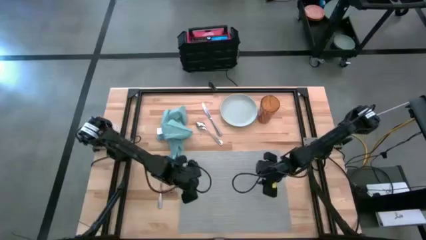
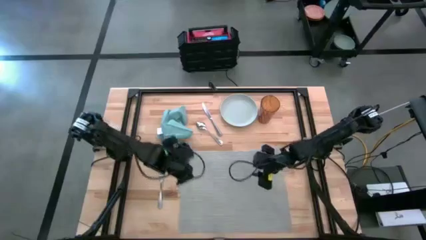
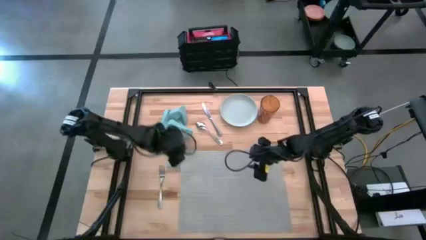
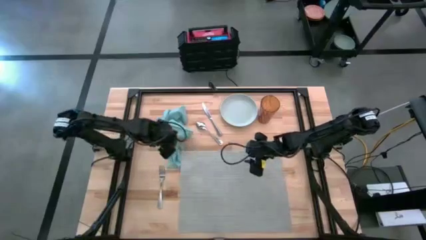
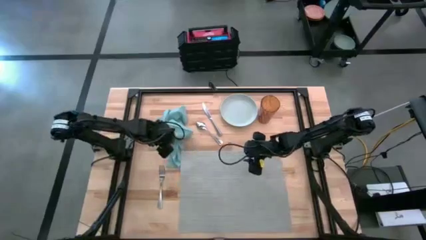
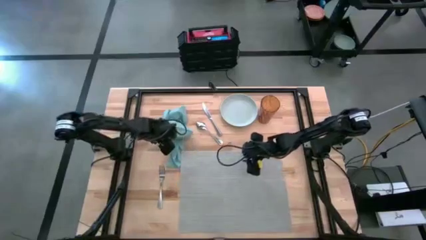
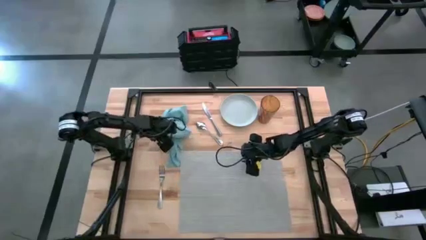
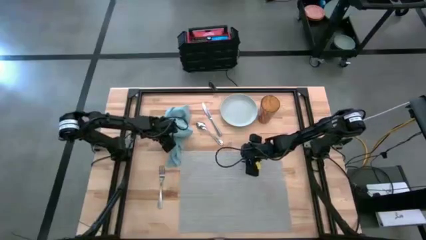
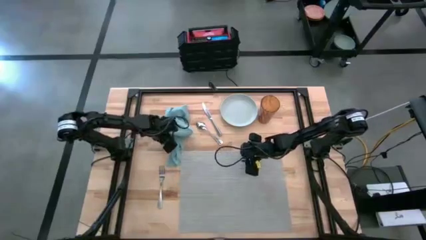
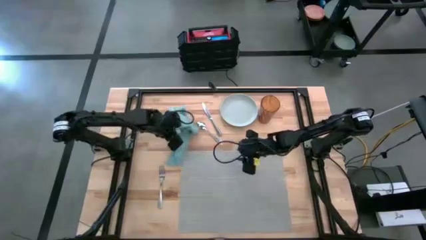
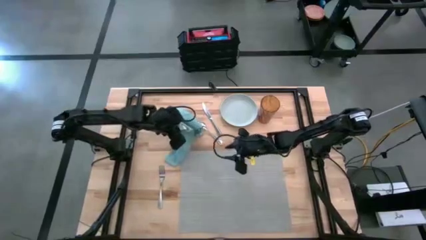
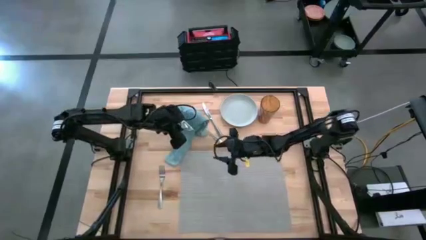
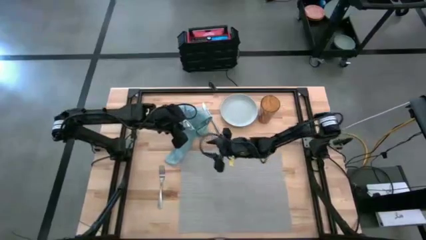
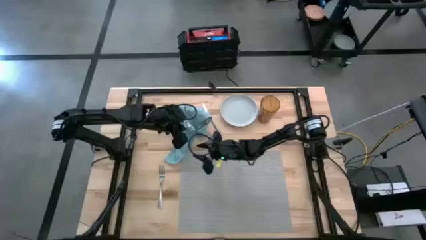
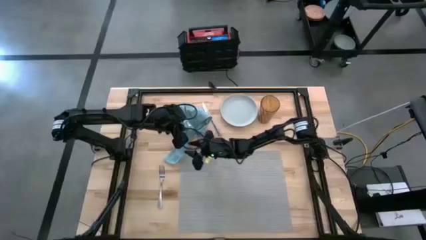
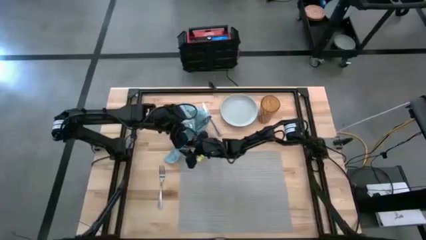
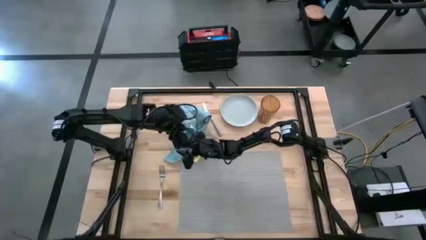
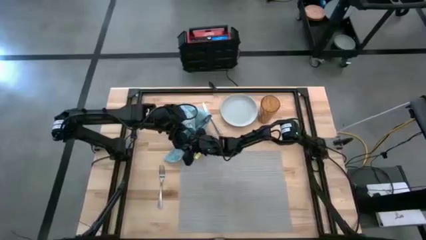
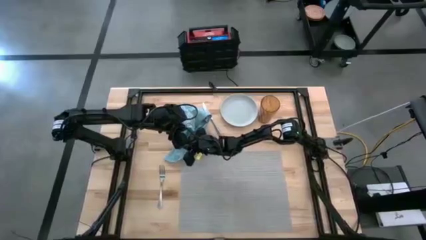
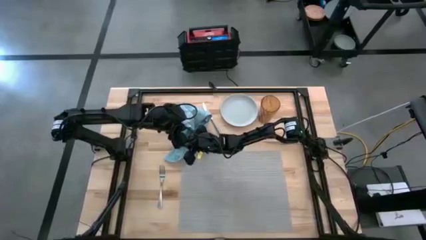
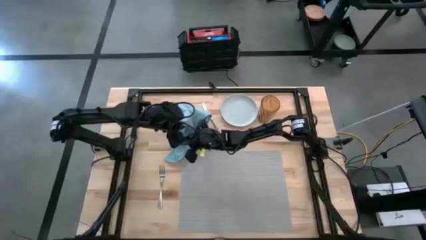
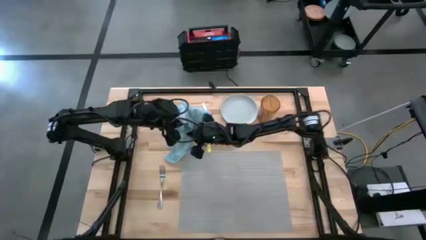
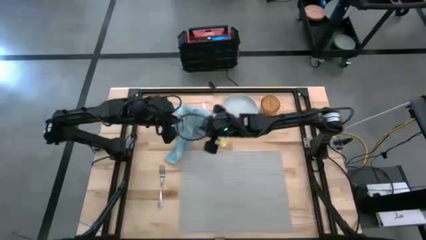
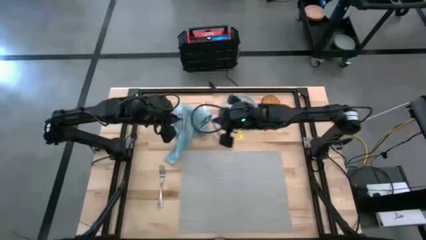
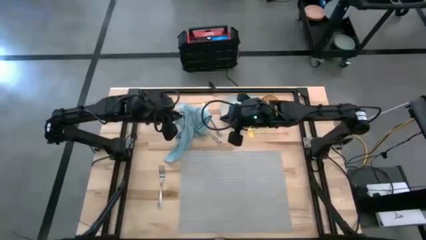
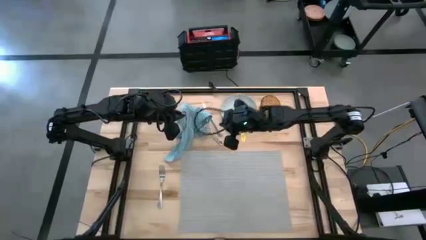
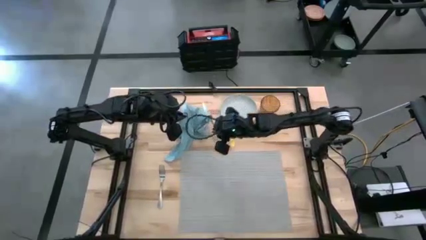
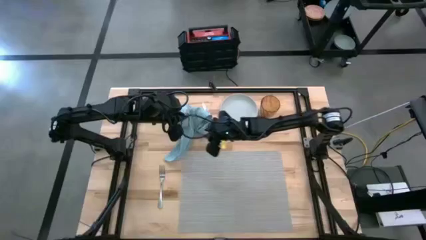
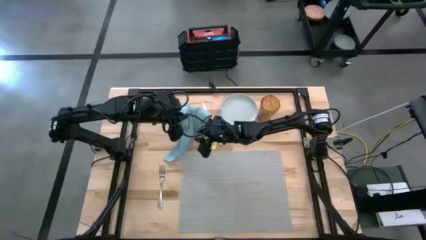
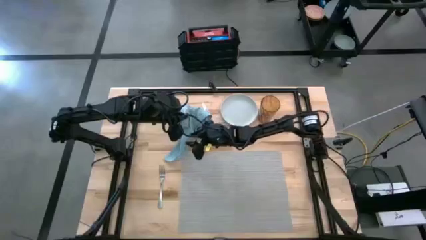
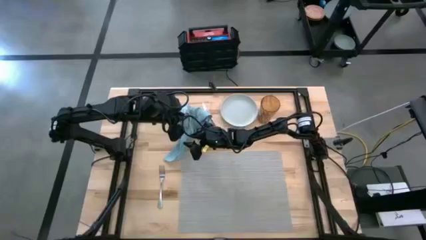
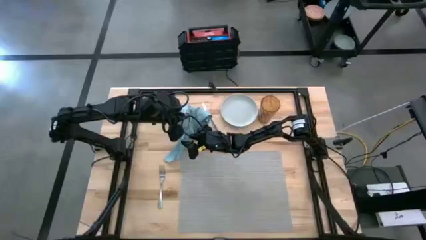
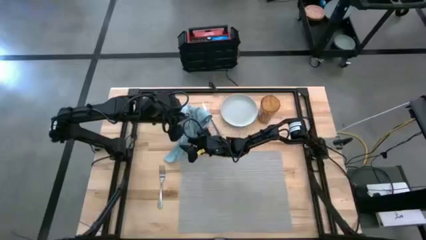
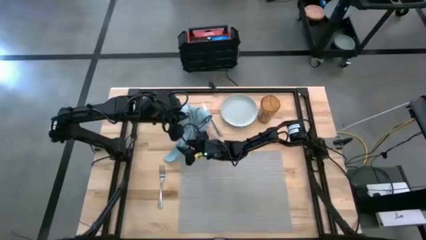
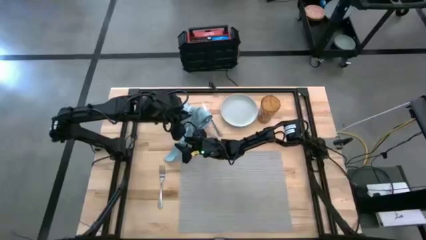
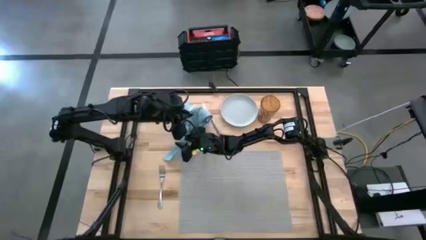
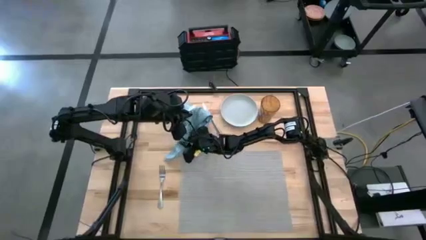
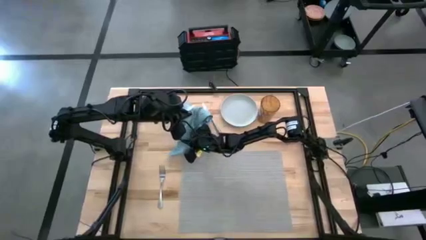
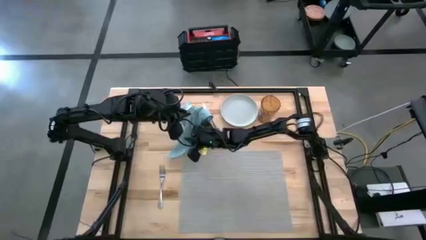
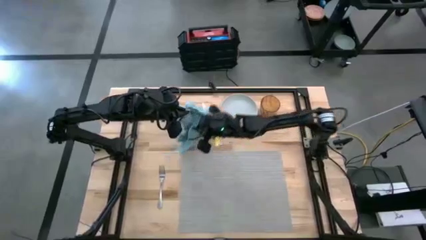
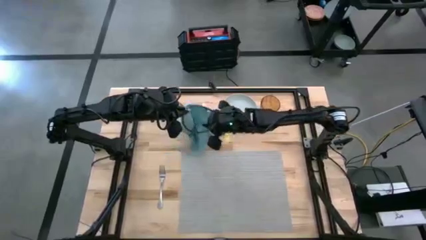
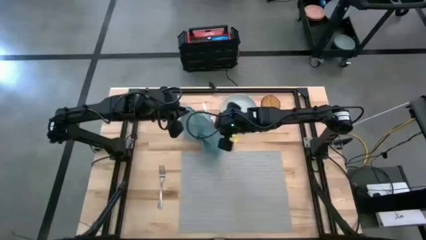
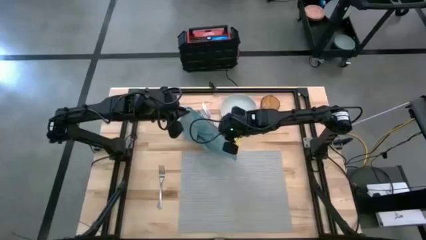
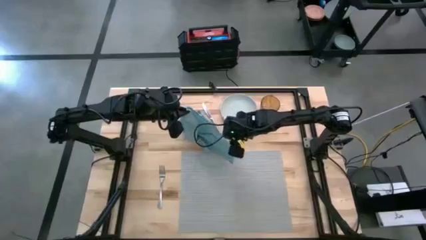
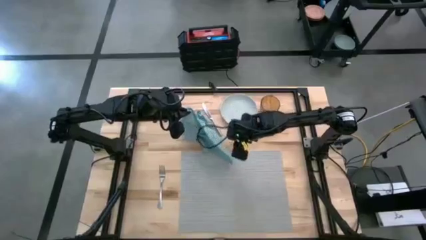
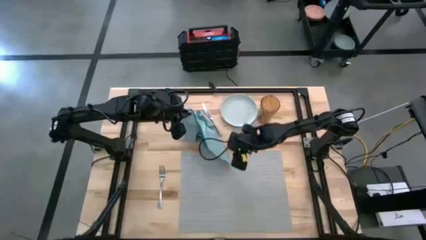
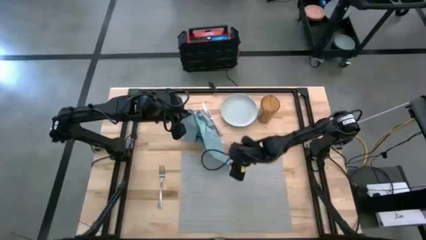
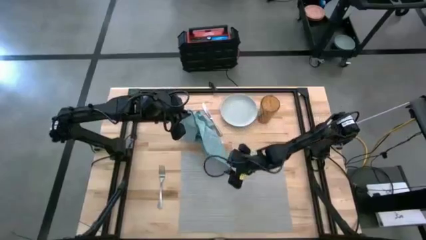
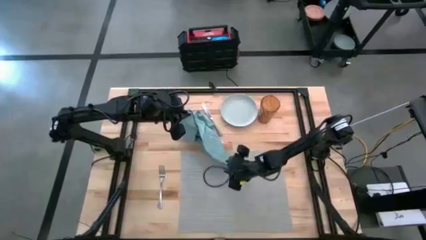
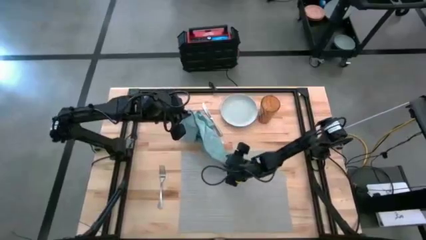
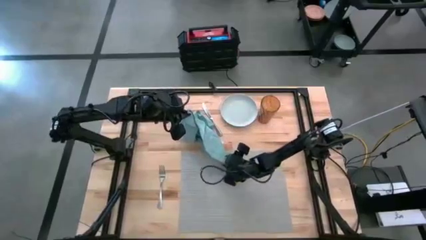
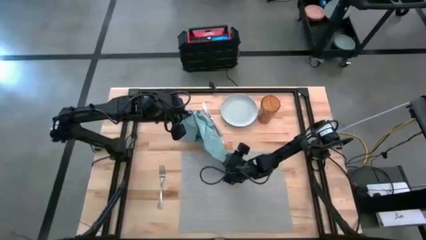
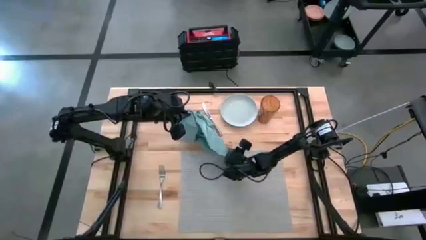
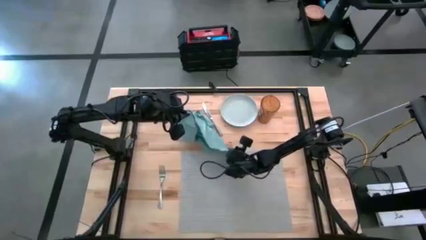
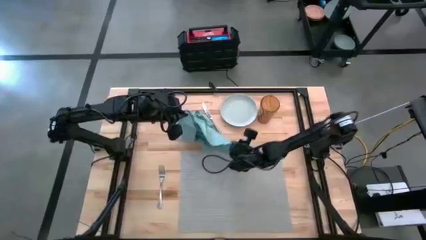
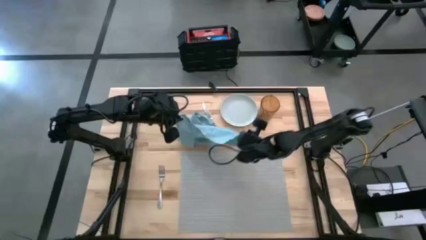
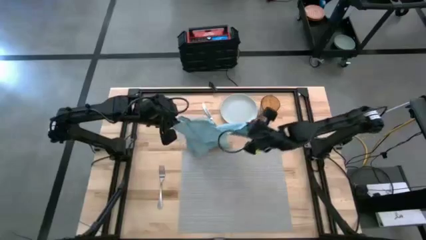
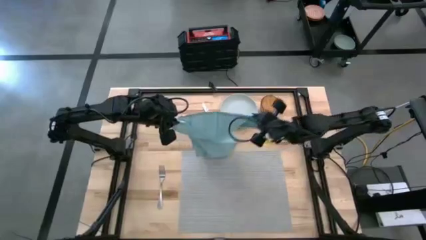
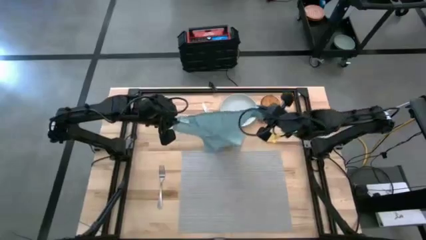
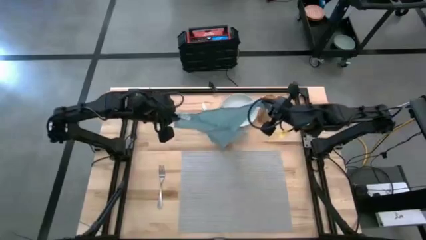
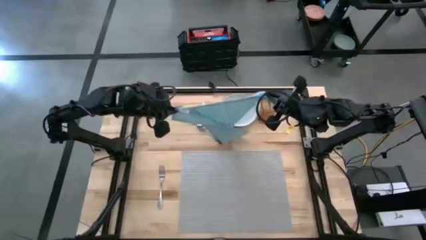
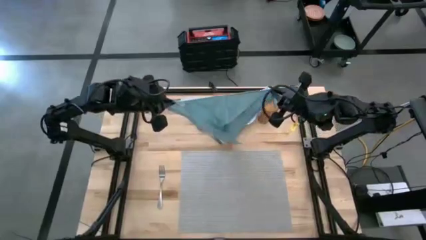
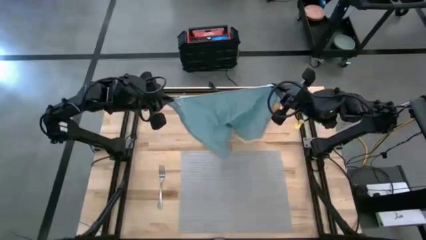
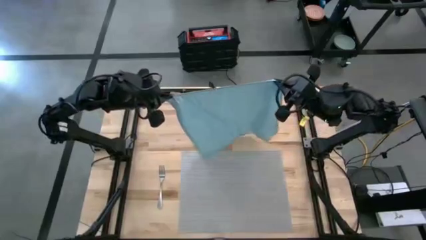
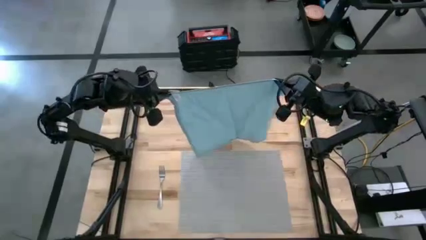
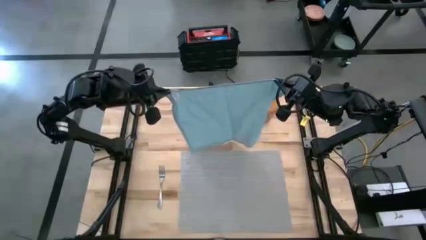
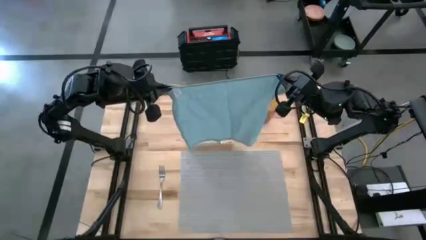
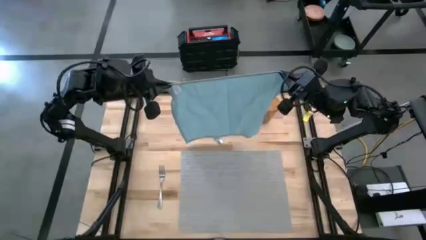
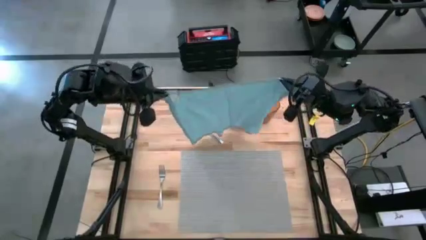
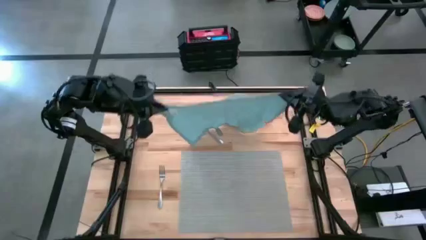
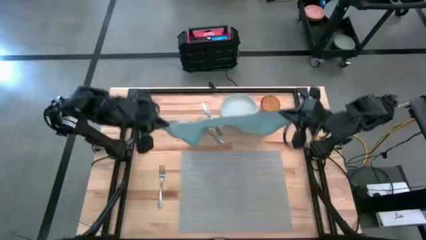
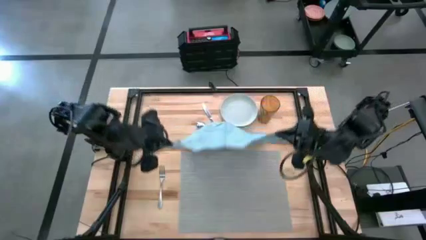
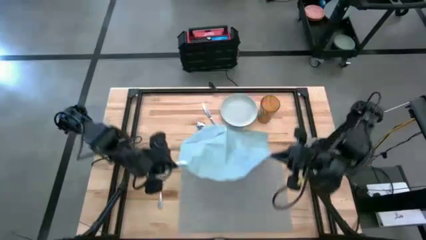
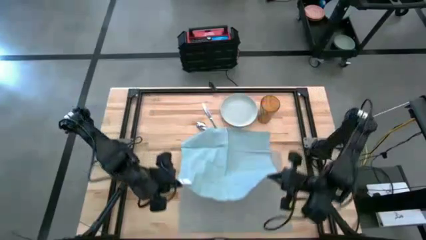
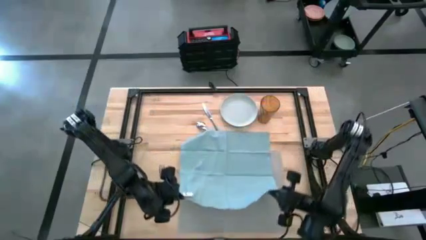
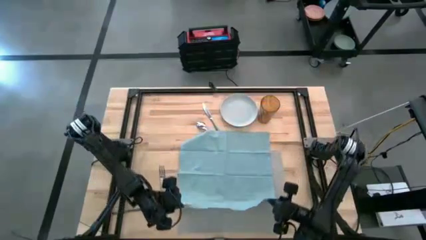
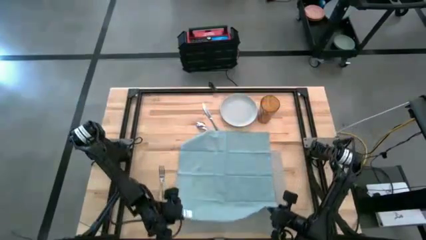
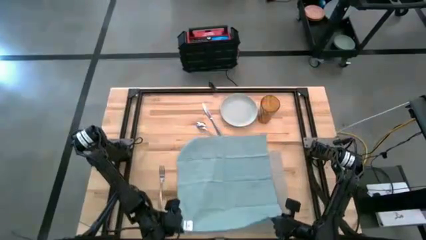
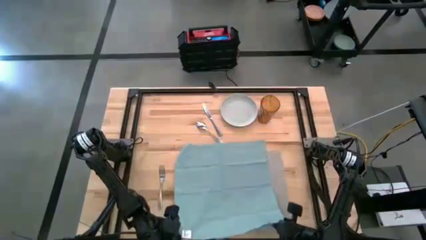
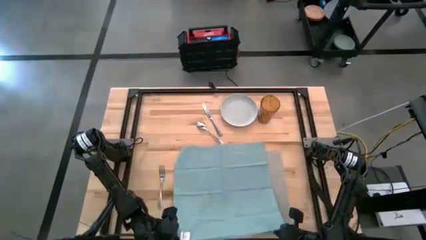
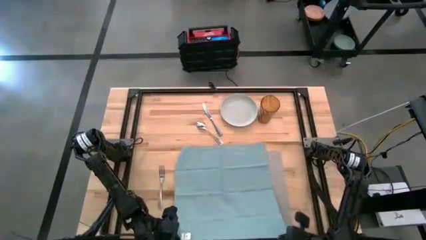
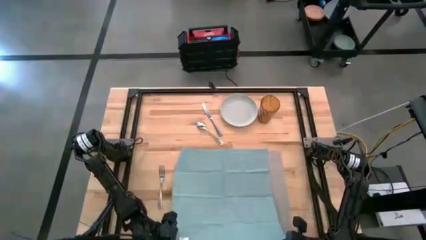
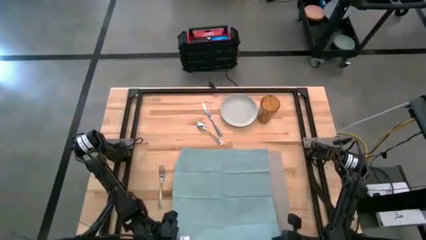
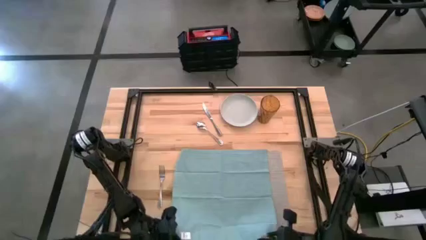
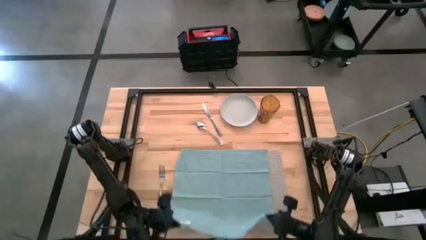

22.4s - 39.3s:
Task: Set table place
Fold the blue napkin on the gray placemat
